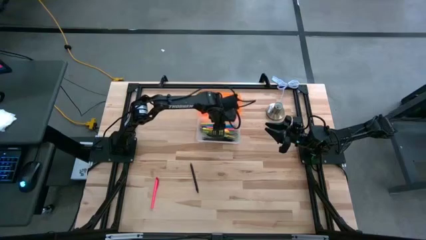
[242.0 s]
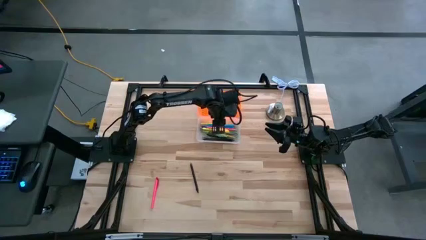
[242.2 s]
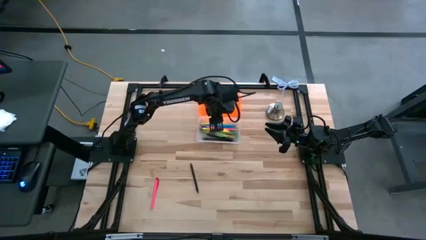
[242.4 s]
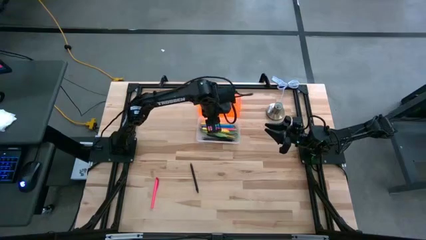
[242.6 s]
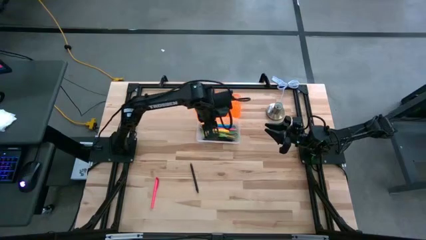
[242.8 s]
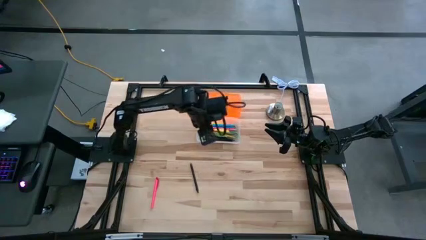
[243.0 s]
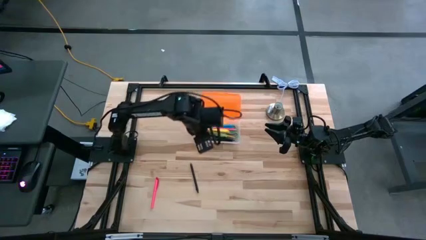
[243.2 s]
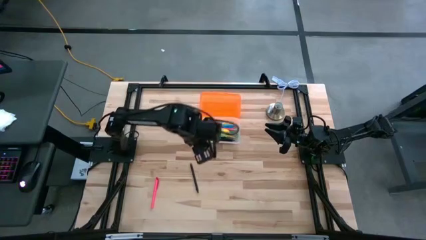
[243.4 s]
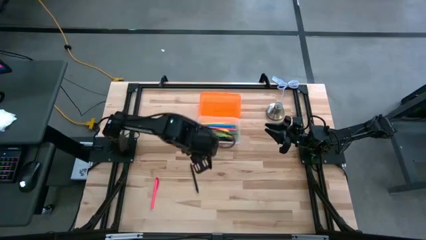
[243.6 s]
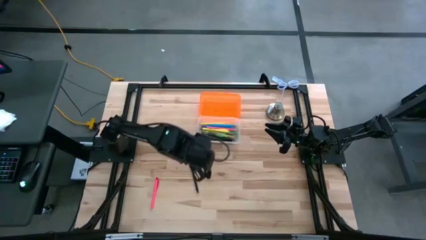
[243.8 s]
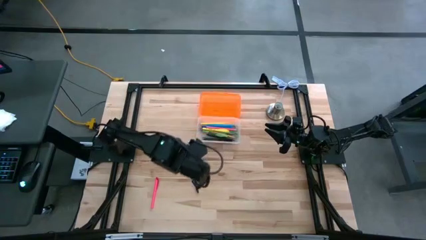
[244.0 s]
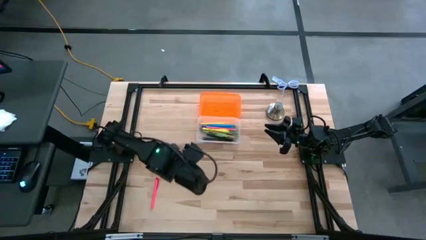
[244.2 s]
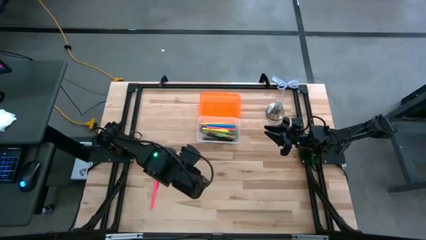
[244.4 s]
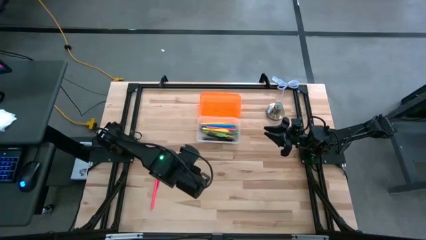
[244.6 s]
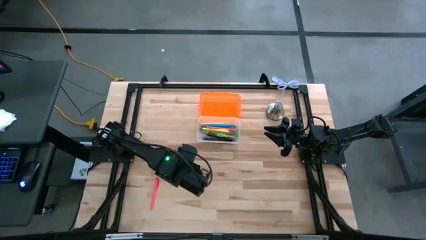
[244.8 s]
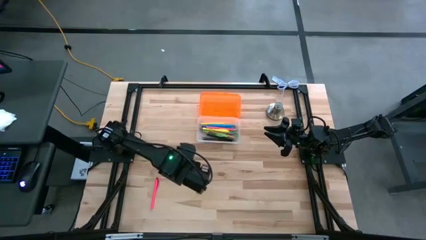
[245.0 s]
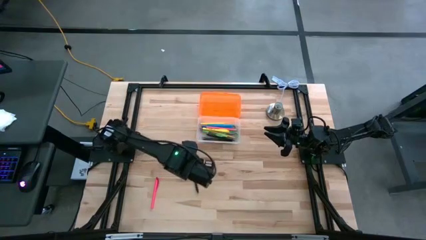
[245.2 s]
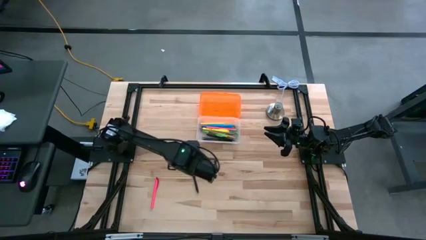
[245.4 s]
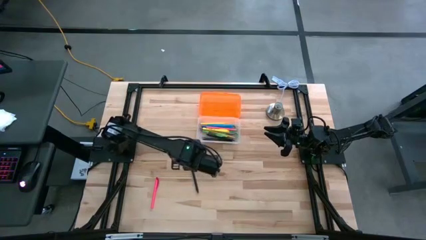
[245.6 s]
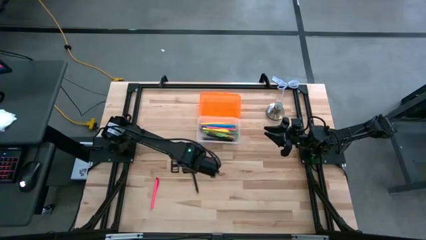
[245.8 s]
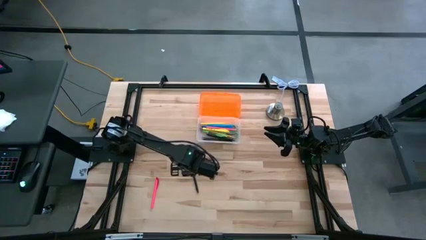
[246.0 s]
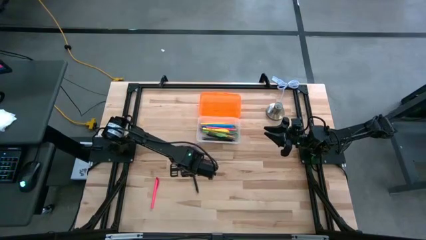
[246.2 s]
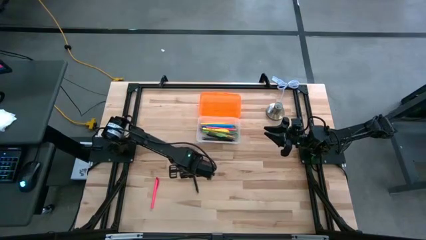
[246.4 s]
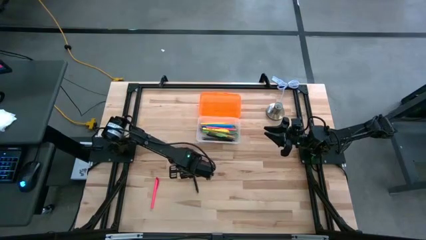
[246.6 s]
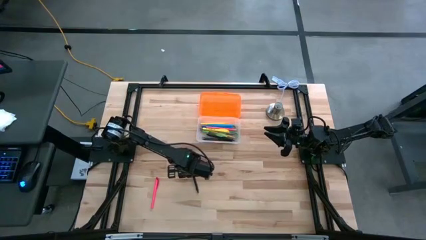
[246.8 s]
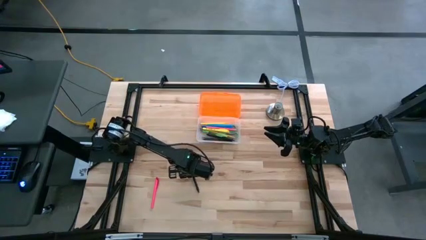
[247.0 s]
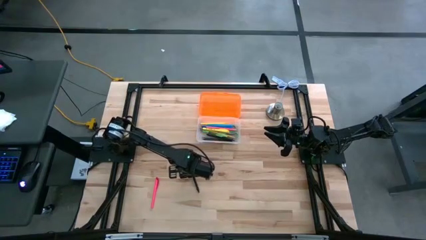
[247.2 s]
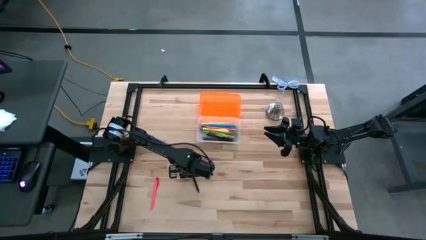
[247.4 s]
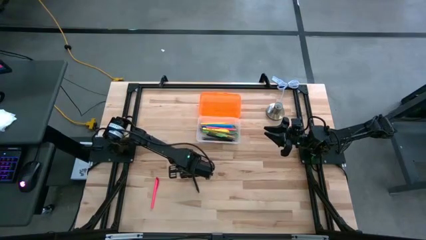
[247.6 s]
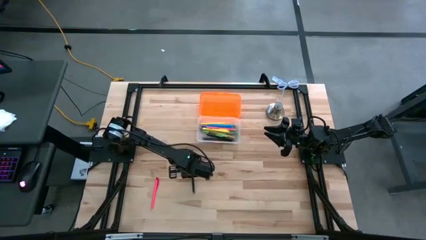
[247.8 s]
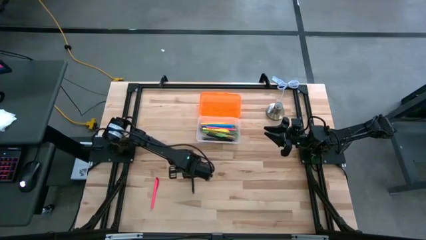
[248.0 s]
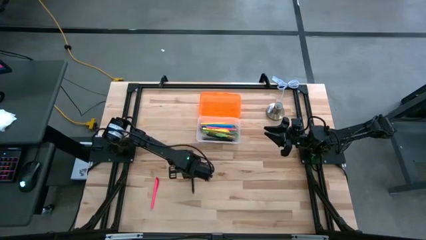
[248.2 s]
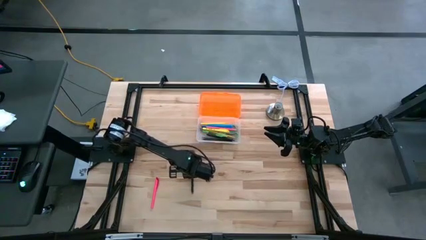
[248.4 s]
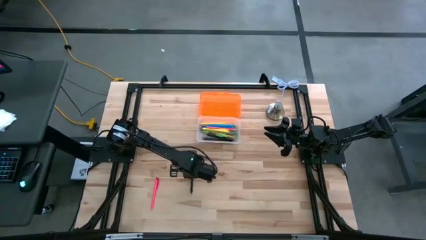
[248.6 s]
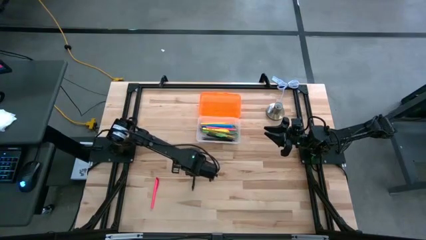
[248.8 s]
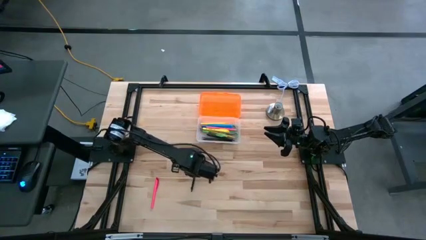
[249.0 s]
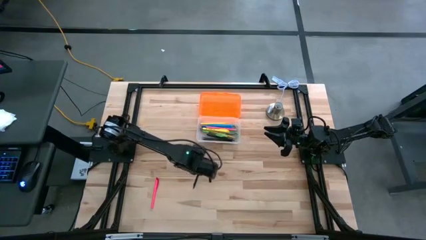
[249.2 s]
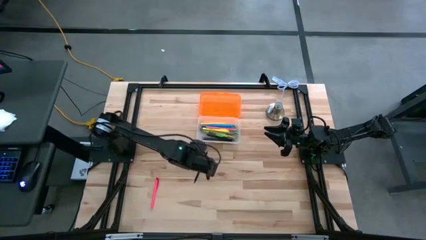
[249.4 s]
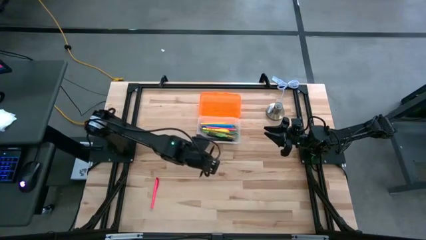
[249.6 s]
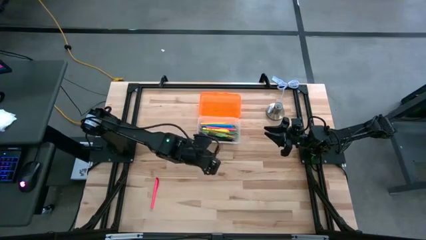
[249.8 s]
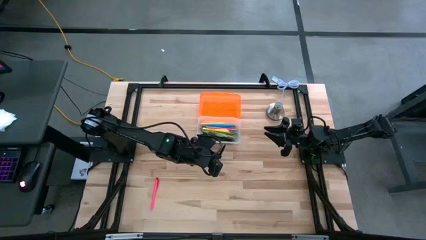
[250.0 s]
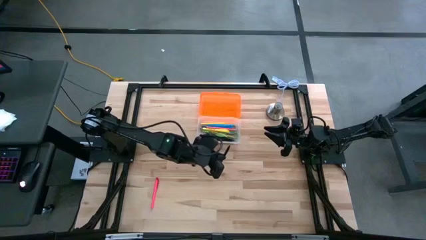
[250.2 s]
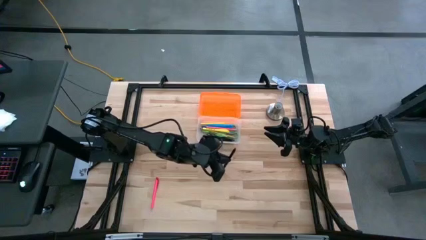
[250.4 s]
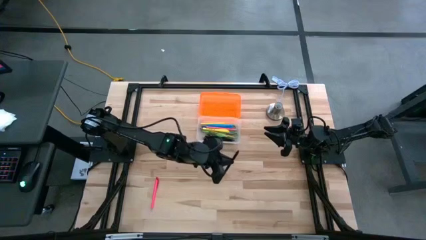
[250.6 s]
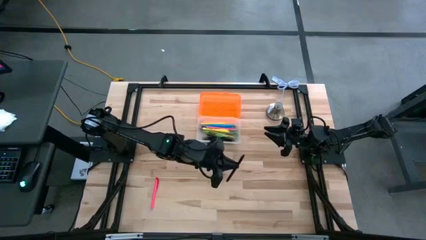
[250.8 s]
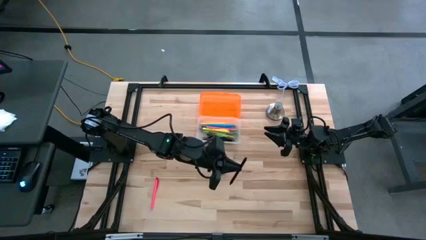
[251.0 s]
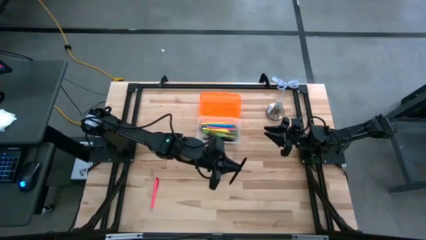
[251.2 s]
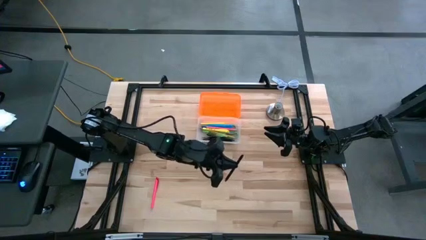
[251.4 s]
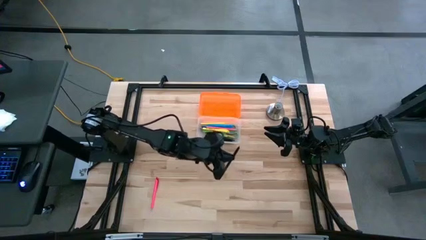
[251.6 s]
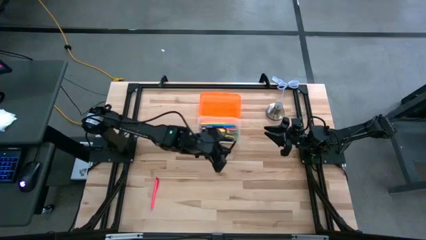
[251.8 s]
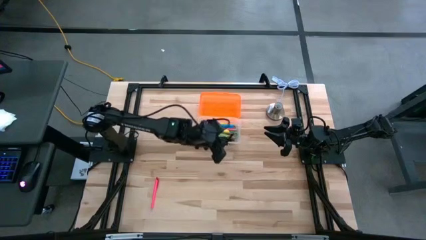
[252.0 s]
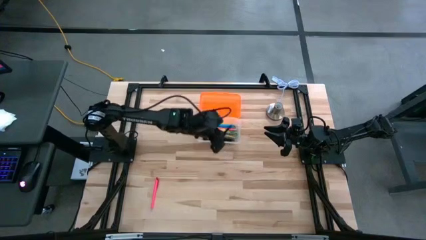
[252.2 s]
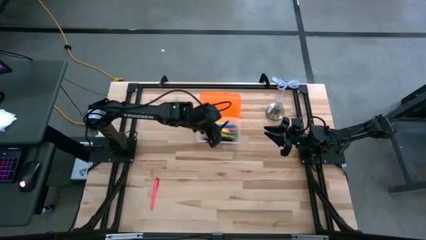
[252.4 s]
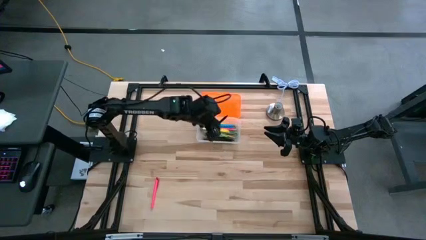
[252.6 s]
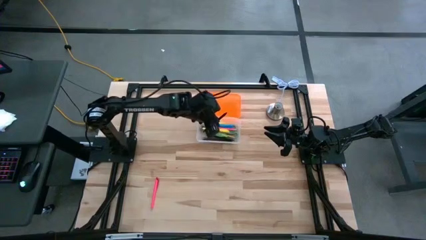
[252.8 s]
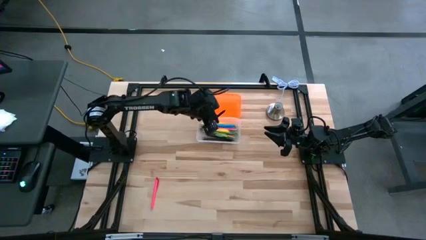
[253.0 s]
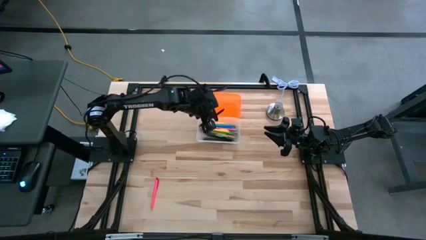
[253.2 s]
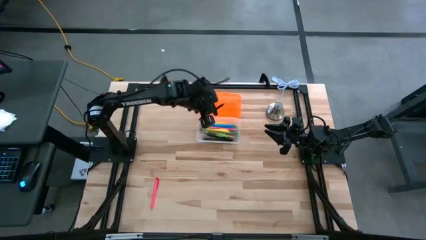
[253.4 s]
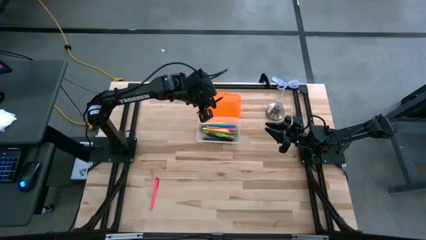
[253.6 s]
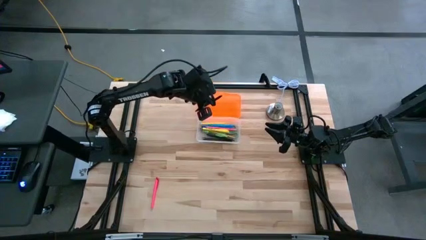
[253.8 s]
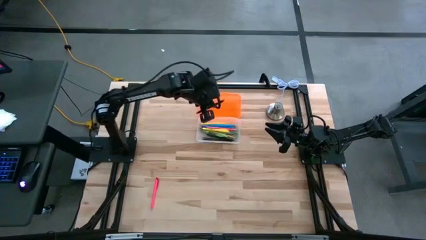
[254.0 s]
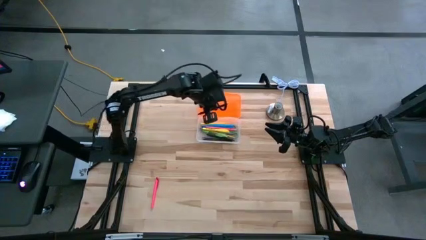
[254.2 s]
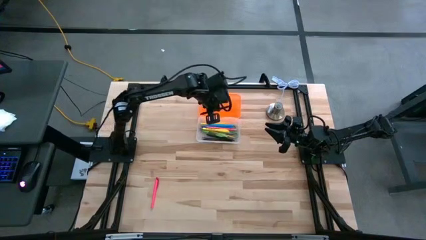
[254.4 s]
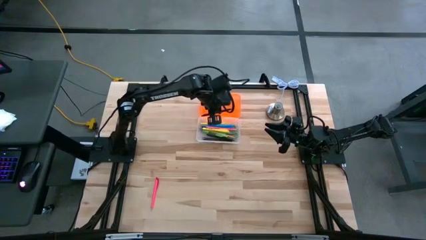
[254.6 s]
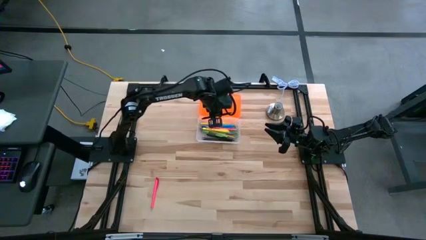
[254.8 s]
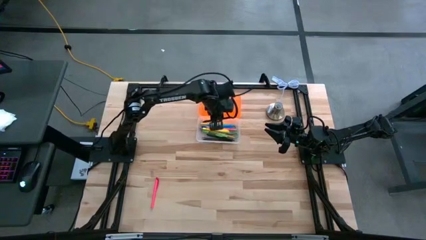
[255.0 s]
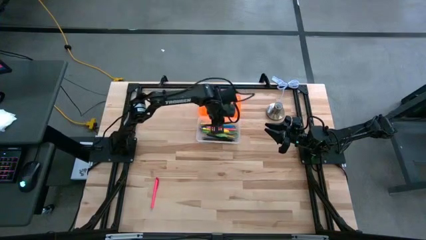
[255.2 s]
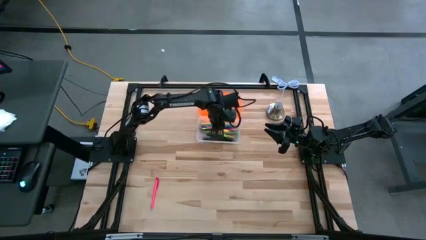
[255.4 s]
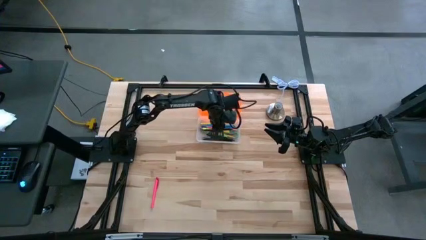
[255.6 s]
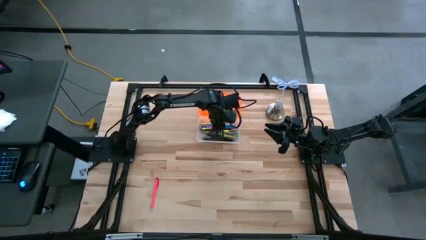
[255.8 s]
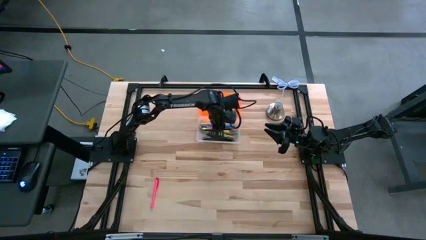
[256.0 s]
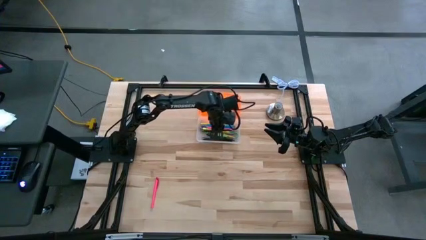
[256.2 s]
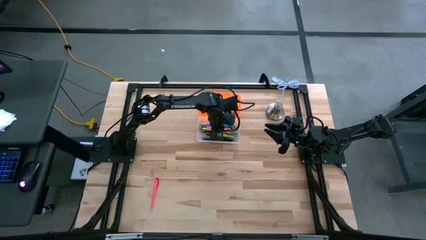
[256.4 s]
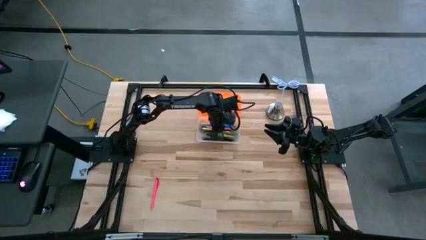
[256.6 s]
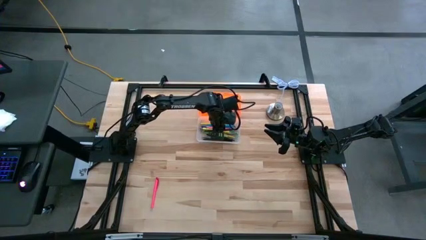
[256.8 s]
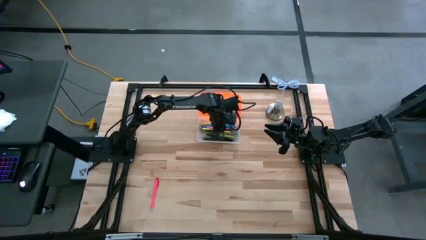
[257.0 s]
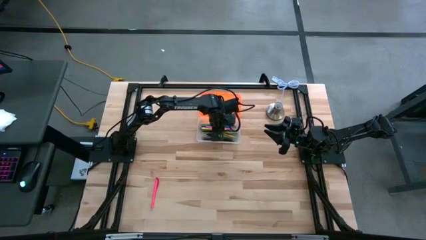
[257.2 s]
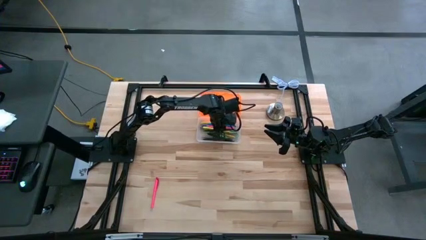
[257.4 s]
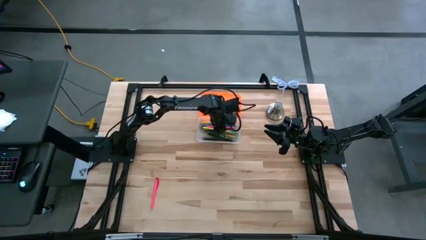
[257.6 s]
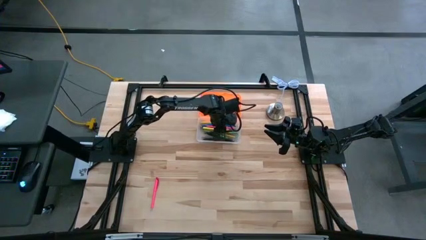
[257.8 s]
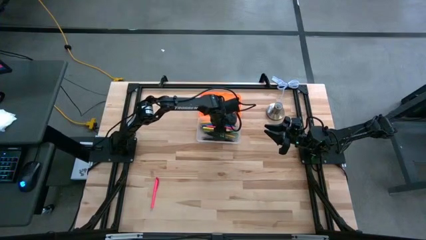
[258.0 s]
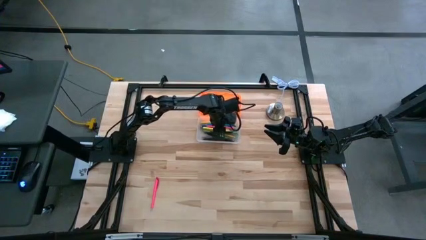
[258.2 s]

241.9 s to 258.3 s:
Task: Pick & place school supplies into a supply box
Put the black pen into the orange supply box

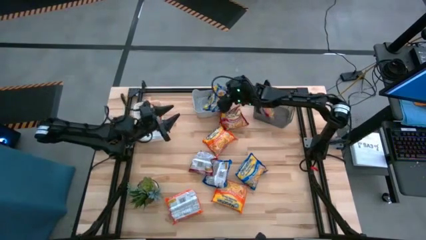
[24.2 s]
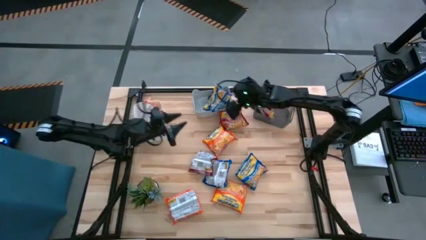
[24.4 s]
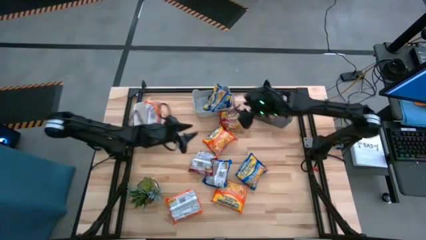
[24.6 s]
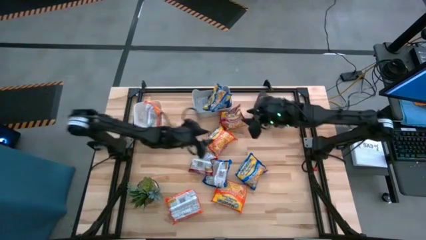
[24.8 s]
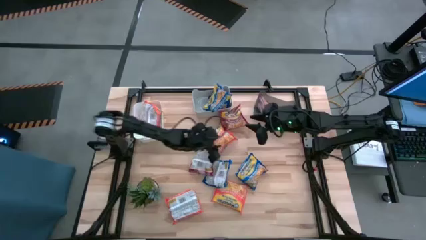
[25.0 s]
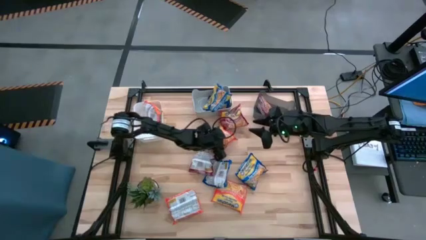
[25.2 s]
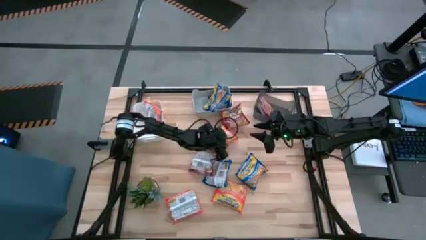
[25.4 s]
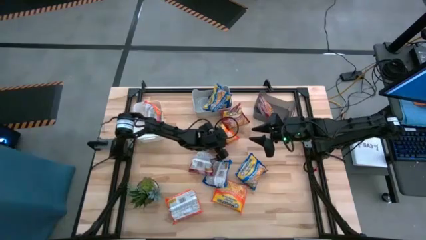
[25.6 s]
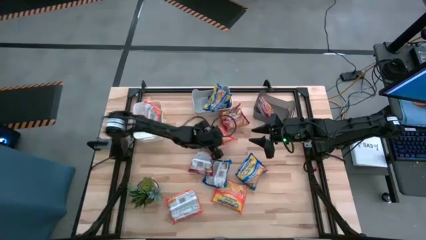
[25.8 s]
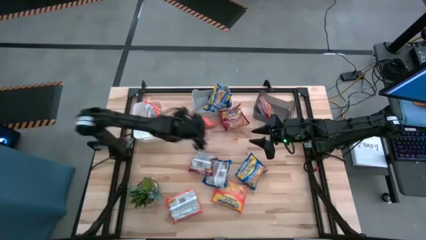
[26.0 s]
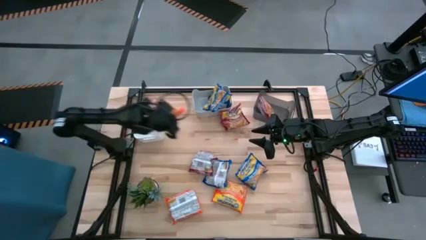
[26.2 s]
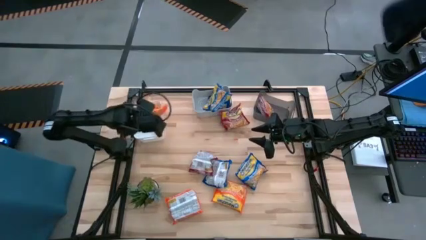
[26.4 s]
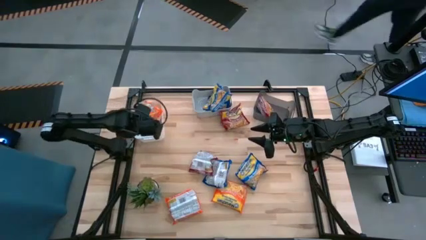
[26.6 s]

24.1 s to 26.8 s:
Task: Sort Maruchan noodles
Put the top middle orange noodle pack into the white bin
